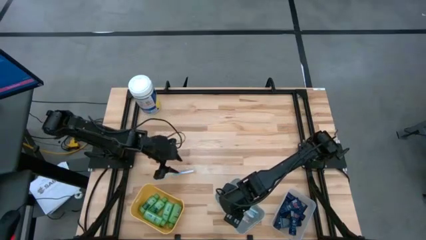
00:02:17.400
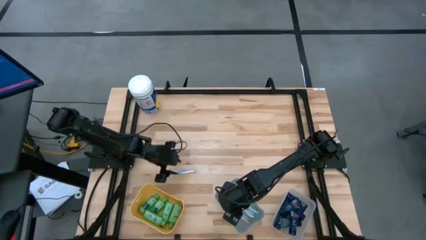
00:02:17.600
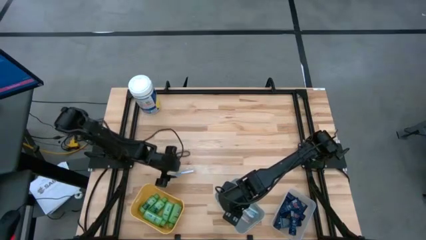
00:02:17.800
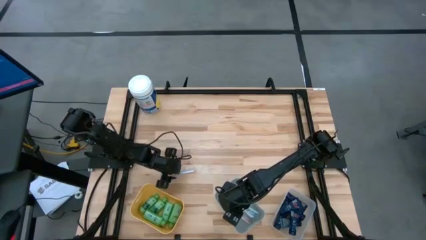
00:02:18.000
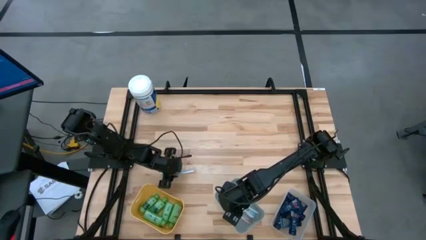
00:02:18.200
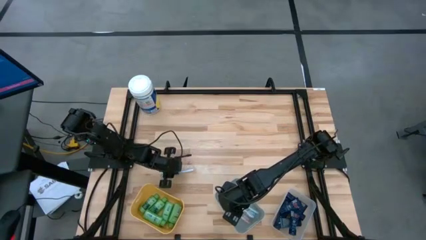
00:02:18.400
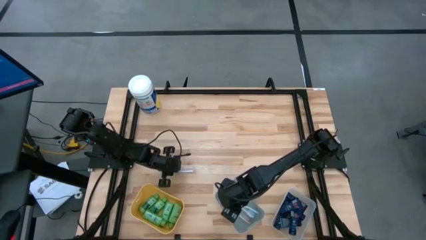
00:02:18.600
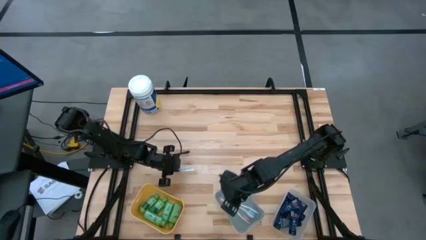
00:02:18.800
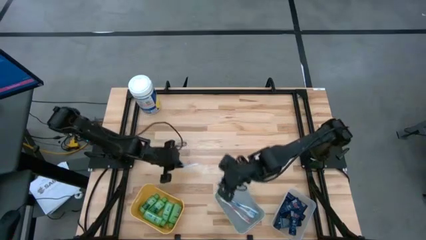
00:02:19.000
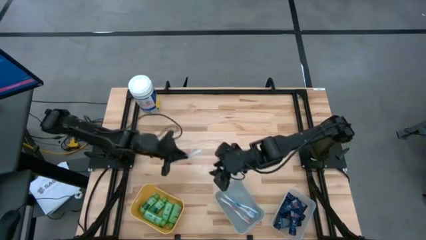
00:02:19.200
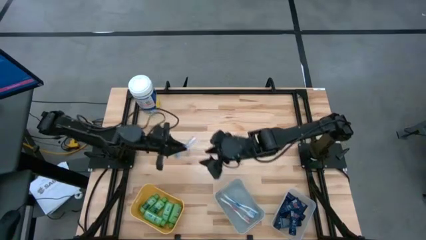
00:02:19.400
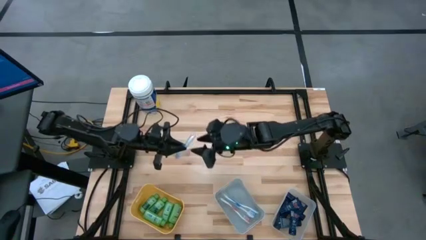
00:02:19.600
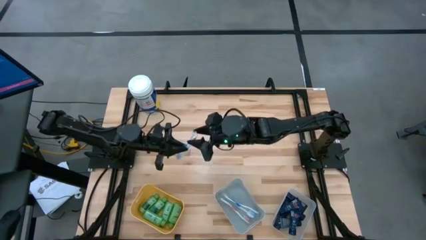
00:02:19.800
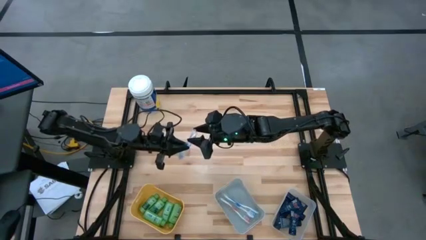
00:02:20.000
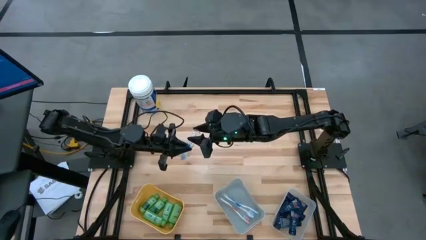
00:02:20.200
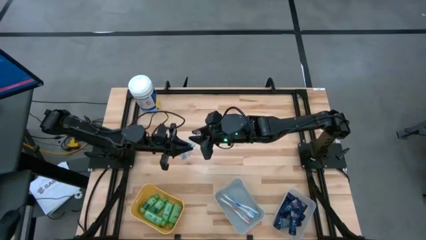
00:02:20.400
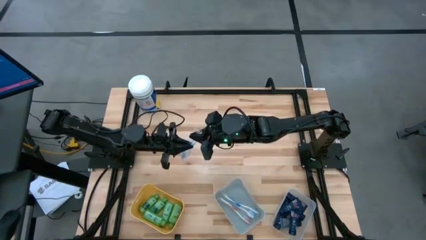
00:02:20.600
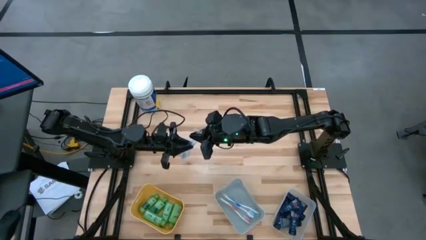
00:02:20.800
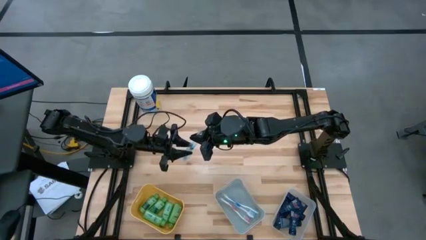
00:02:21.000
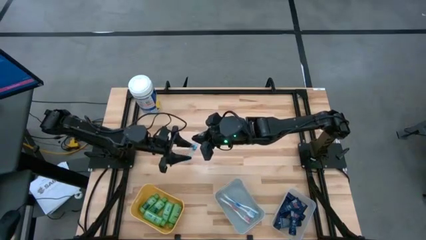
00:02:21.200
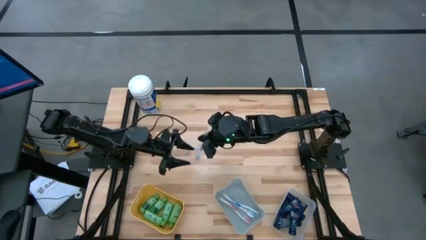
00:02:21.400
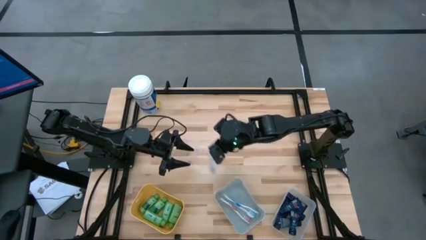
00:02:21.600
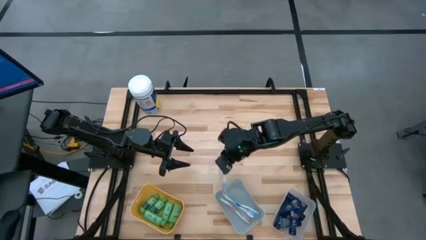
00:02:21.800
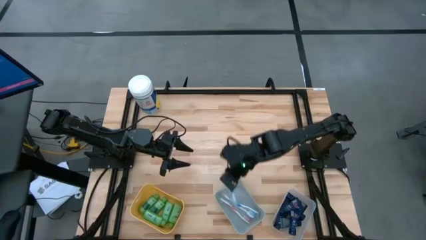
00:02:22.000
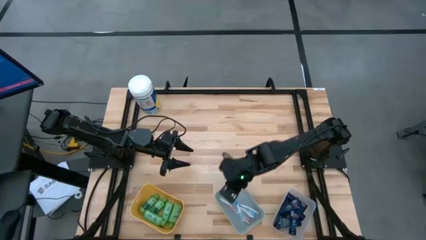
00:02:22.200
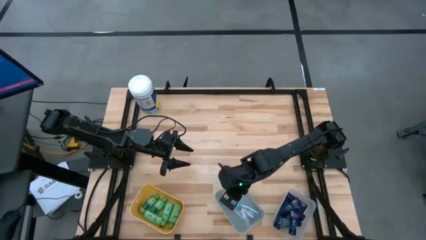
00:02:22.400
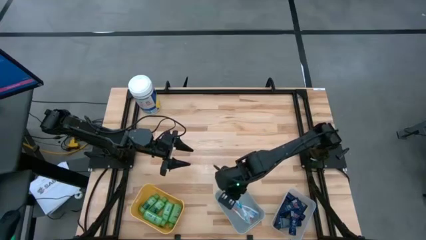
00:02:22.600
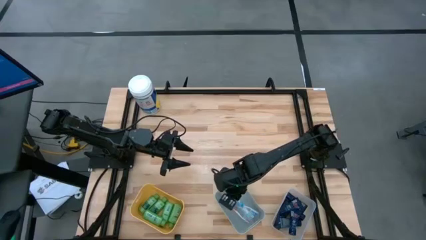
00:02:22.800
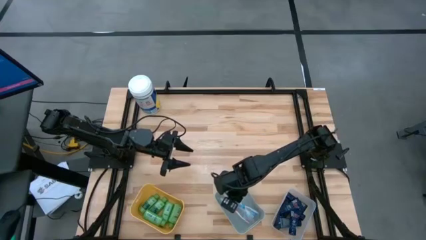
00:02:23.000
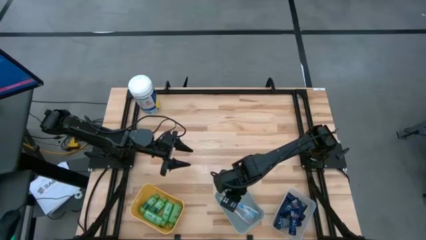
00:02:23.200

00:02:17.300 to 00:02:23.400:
Task: Pick & Place Travel size toiletries
Put the blue toothbrush into the gray bin

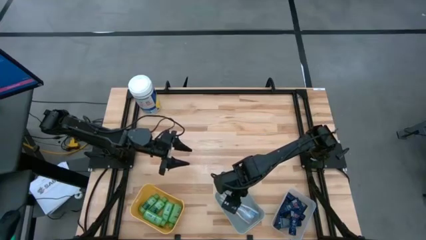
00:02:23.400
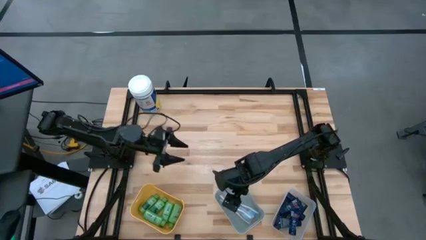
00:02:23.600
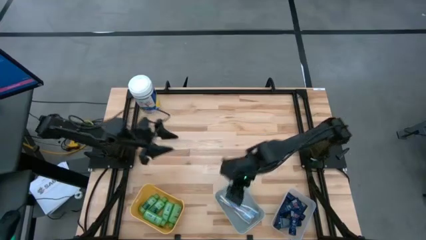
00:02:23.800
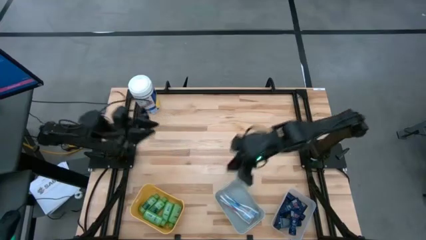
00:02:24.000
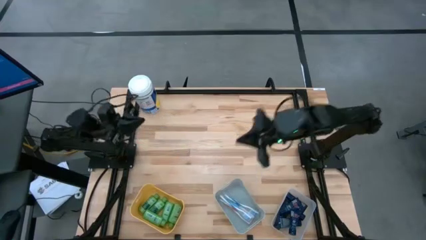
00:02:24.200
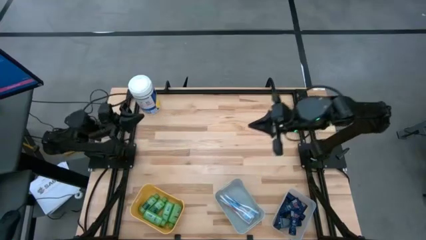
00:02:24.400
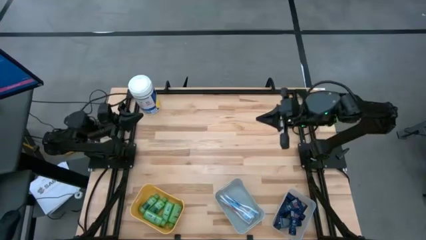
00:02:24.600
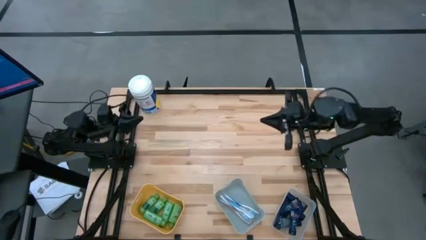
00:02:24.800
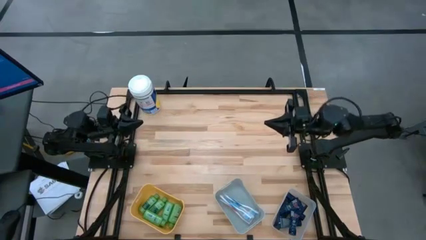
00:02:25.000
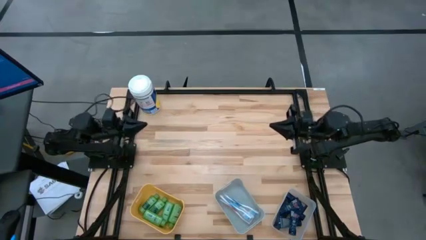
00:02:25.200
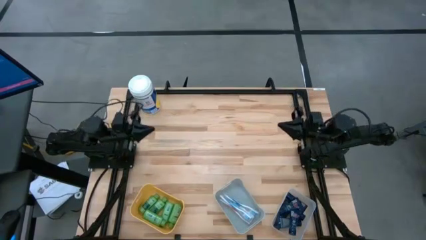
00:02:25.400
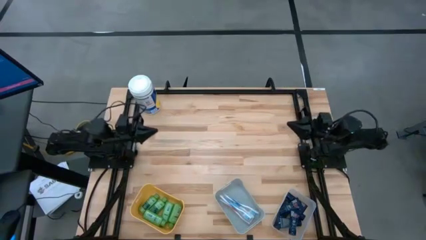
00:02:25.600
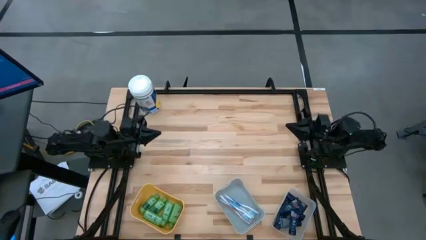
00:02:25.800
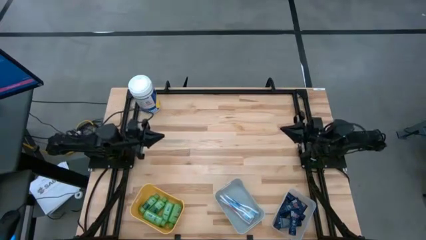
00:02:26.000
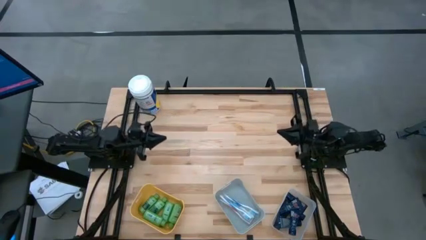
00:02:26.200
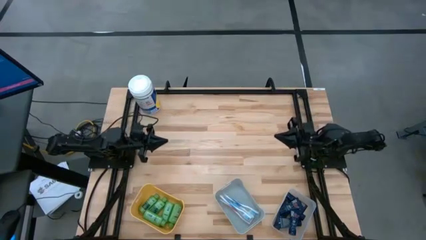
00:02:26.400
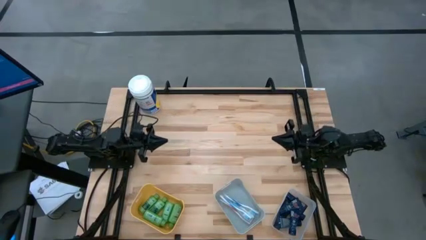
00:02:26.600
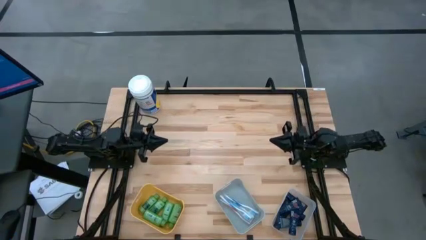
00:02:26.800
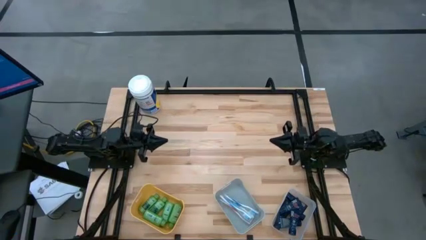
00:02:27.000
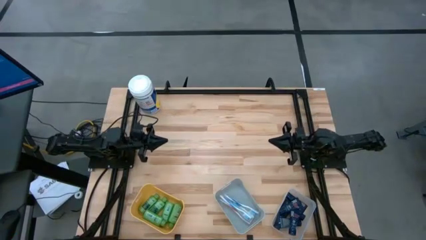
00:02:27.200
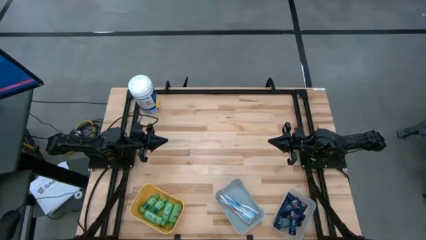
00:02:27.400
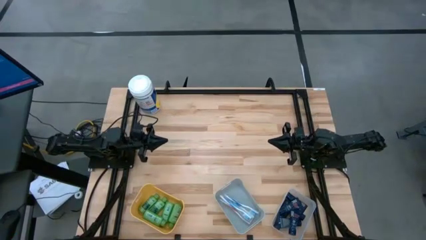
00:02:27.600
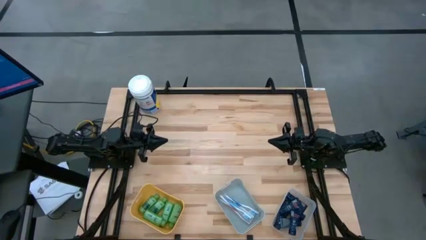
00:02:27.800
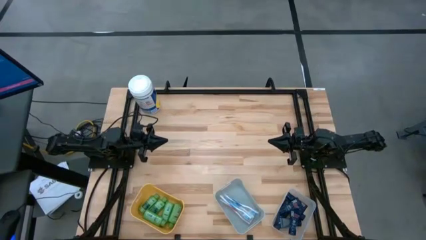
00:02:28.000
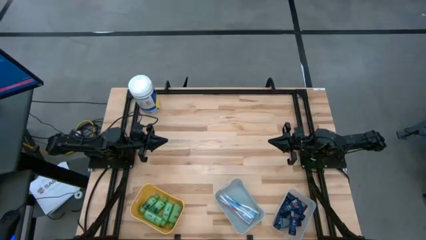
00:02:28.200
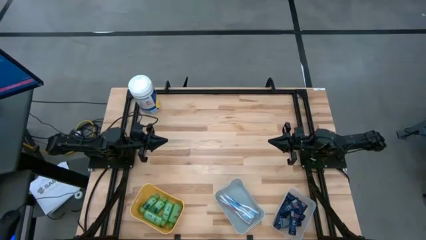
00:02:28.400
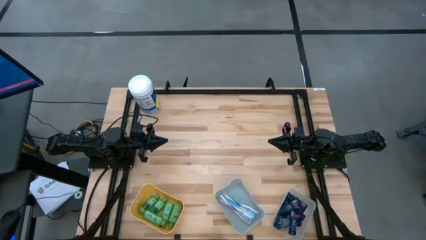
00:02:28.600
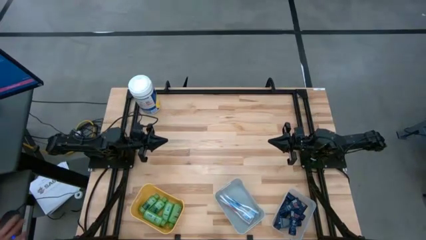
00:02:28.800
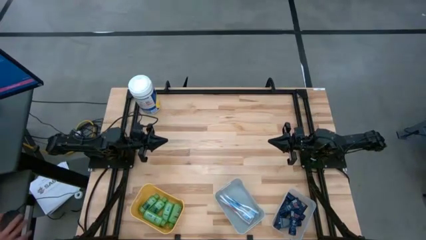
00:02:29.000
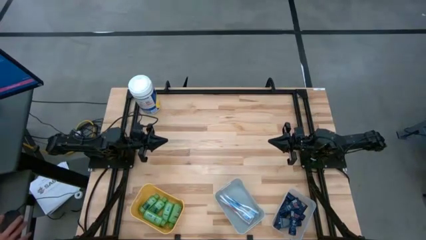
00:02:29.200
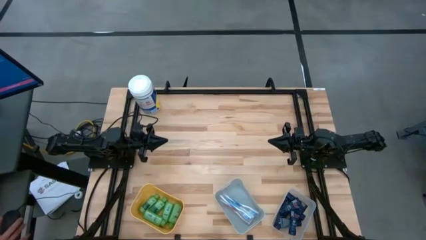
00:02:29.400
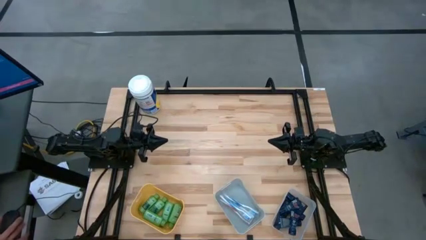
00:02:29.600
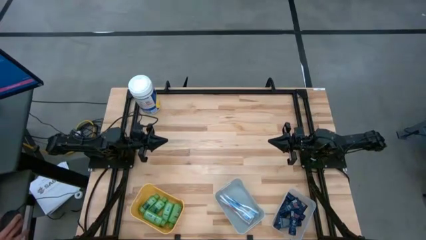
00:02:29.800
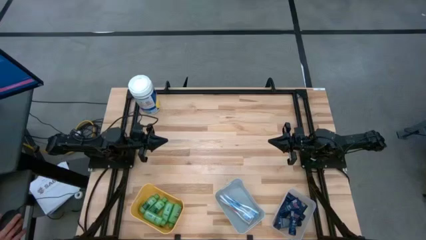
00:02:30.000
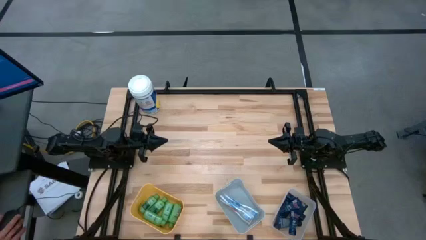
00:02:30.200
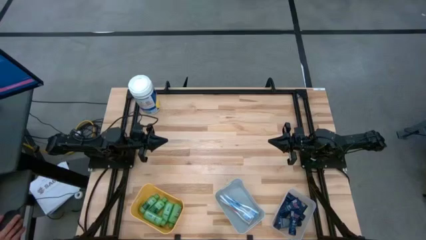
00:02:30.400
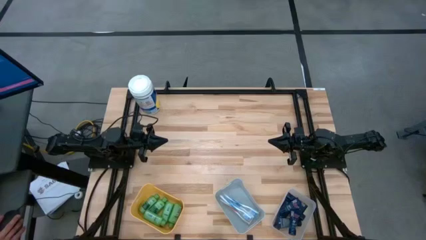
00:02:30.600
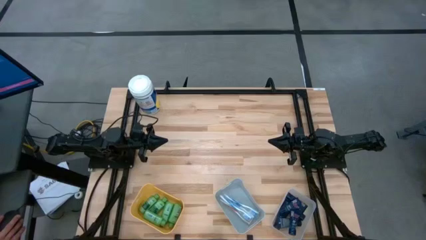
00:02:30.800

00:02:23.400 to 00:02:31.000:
Return to Home Position

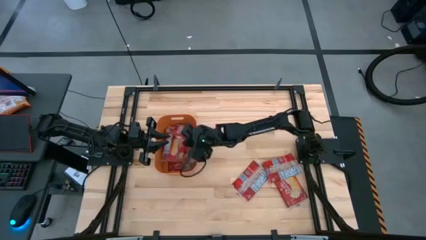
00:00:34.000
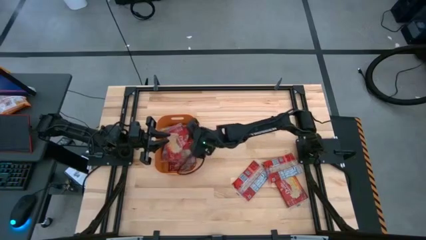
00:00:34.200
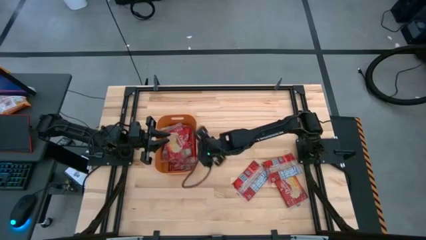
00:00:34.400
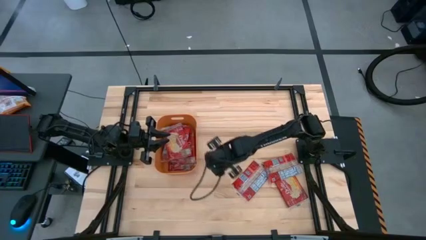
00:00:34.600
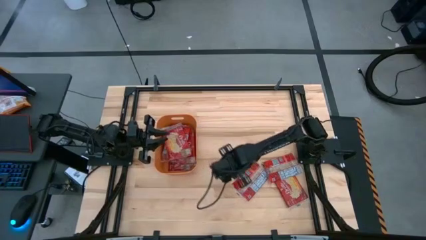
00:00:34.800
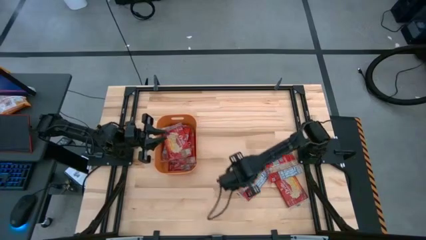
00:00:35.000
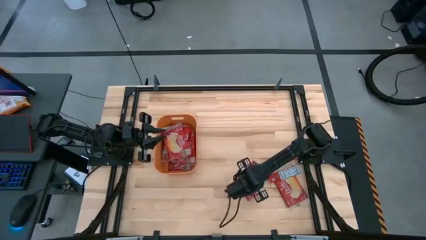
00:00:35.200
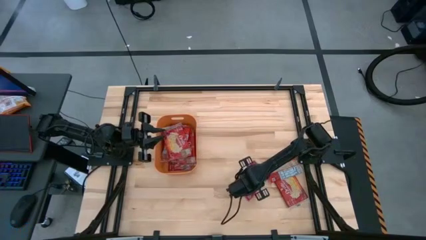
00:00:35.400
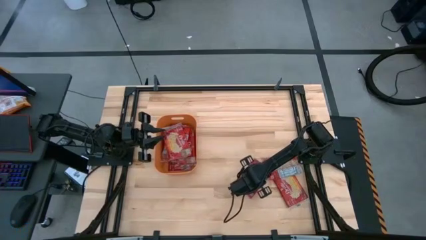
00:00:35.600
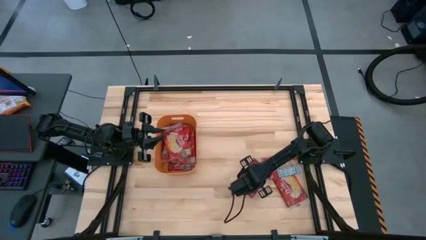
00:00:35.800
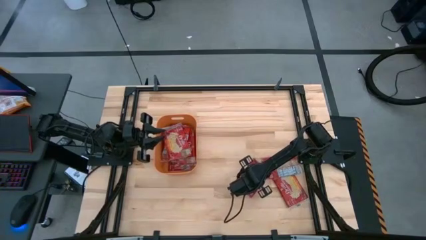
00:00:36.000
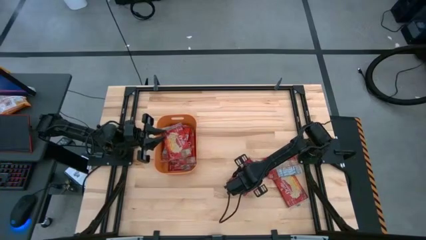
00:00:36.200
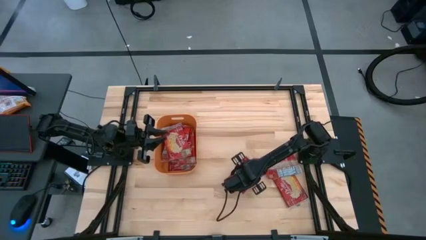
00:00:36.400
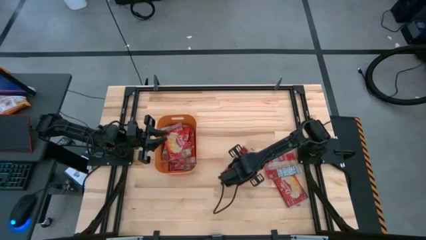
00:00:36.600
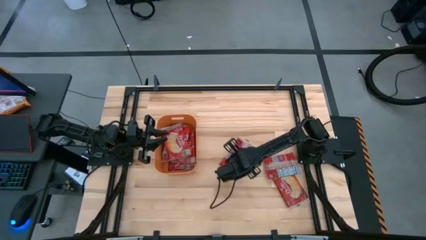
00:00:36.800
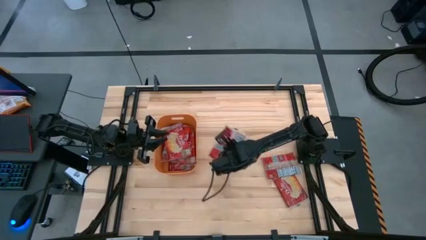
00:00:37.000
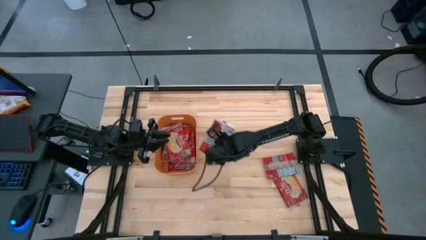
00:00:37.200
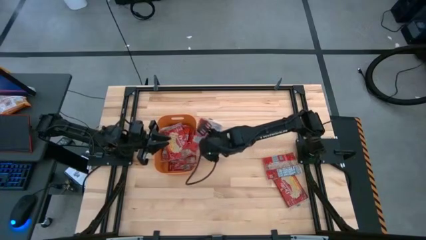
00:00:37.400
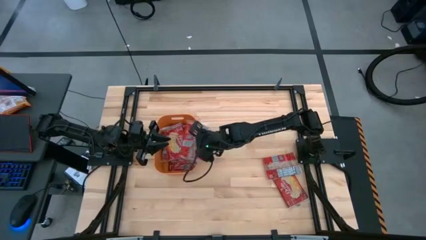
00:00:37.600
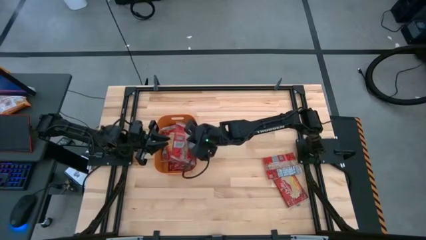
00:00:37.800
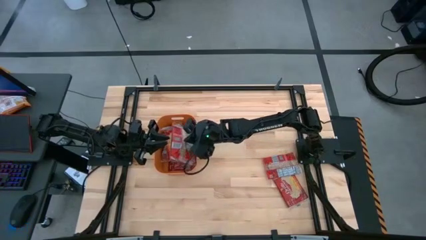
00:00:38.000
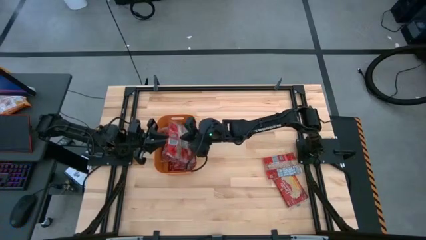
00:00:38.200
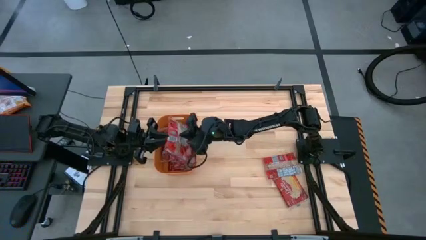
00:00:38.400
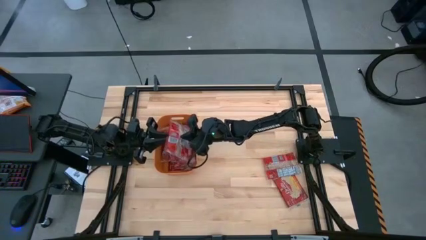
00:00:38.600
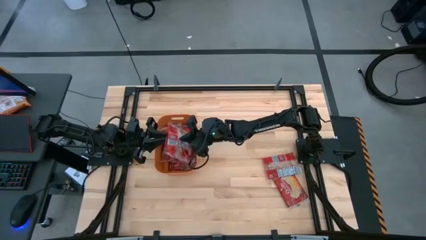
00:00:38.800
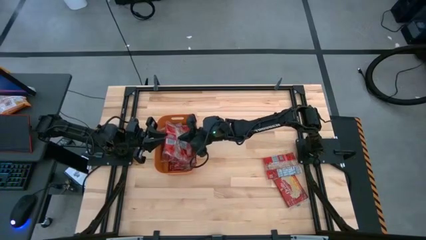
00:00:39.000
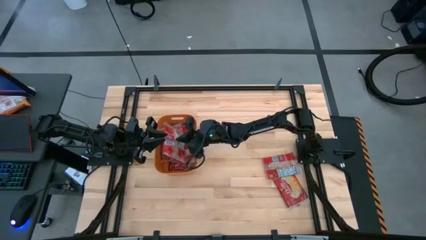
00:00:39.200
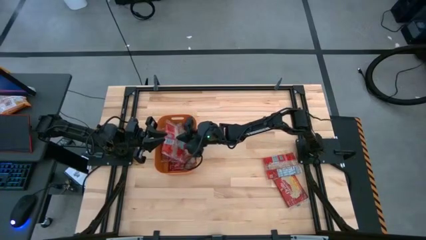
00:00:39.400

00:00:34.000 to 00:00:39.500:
Task: Sort popcorn bags into baskets
Put the popcorn bag into the orange bin
